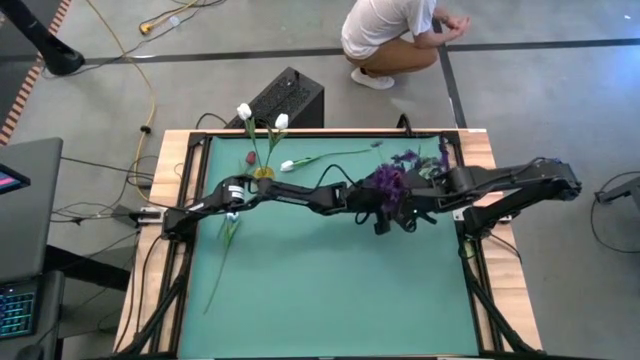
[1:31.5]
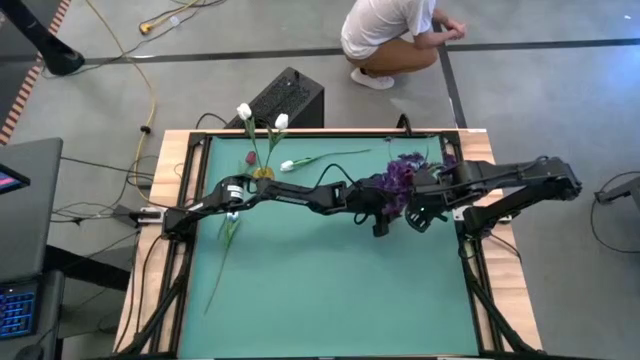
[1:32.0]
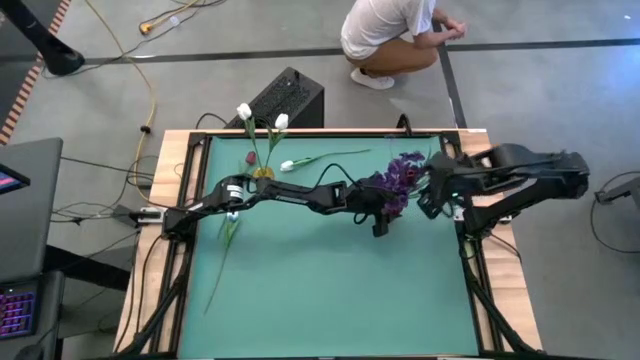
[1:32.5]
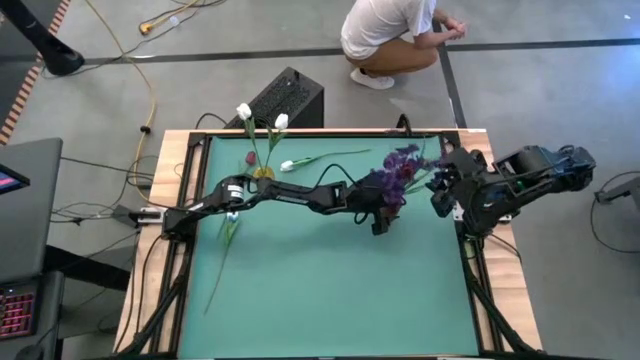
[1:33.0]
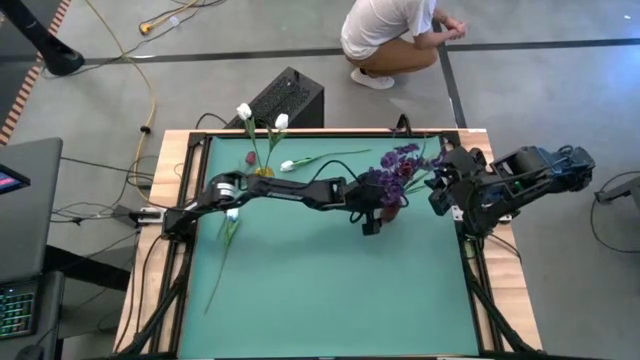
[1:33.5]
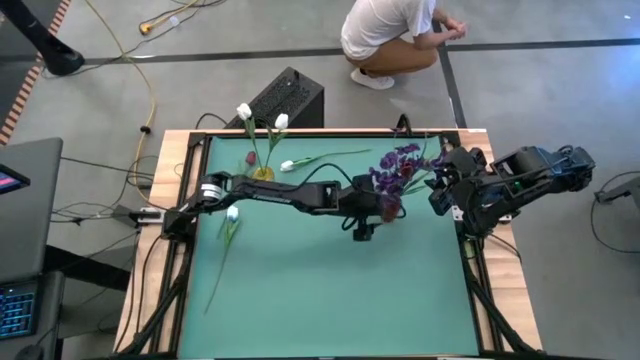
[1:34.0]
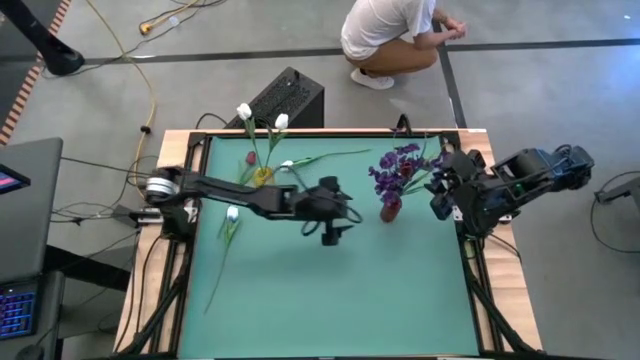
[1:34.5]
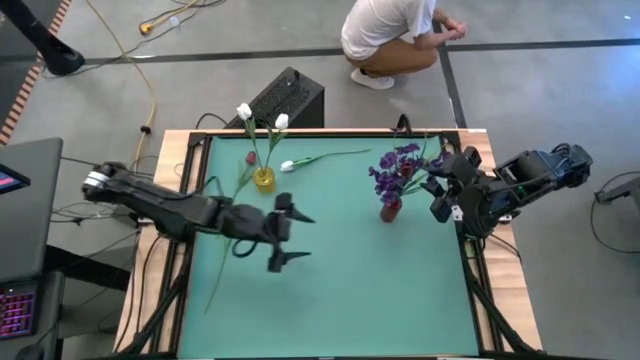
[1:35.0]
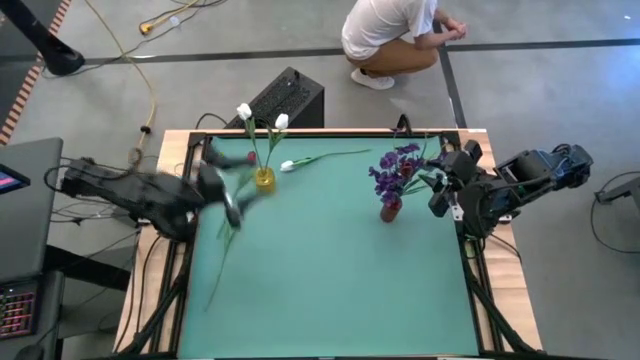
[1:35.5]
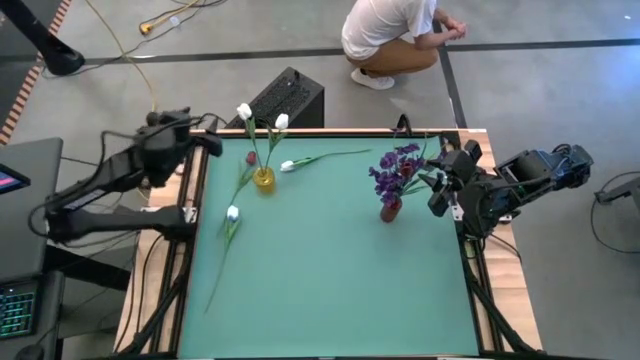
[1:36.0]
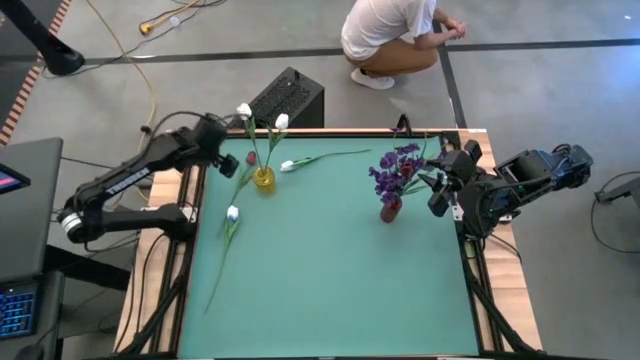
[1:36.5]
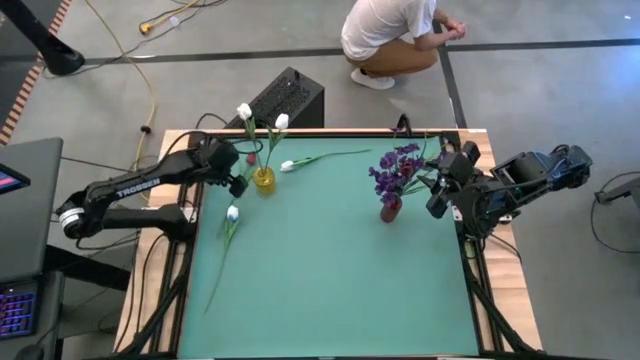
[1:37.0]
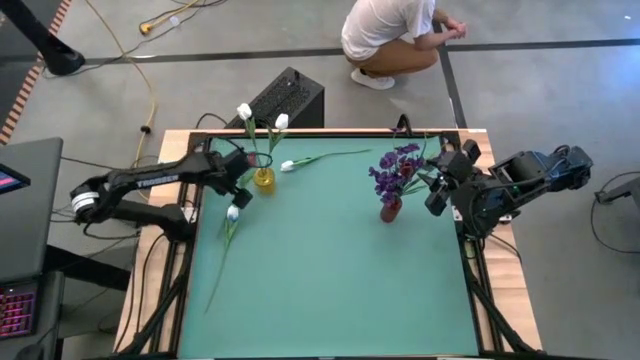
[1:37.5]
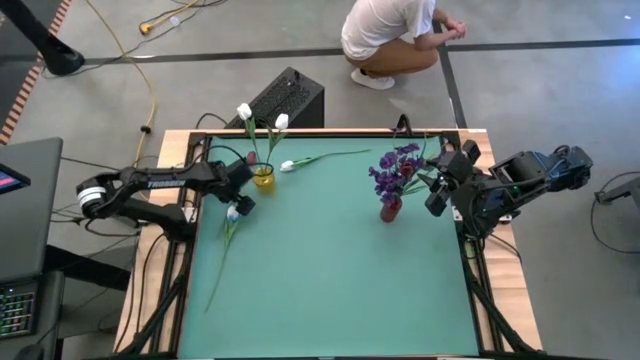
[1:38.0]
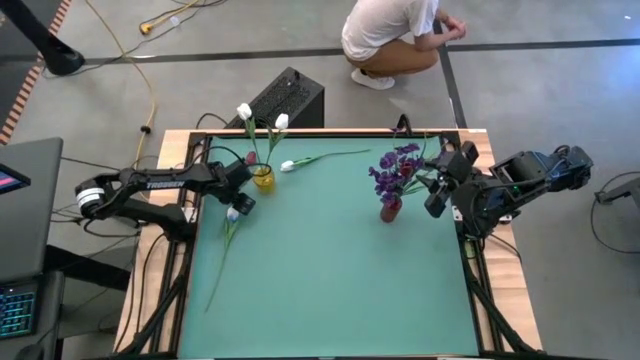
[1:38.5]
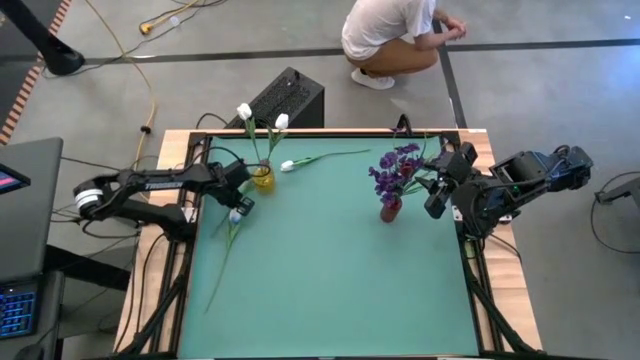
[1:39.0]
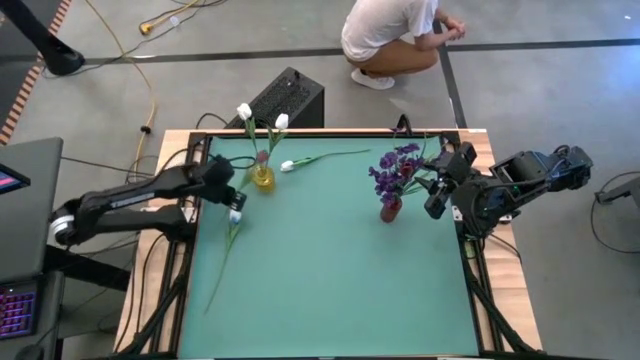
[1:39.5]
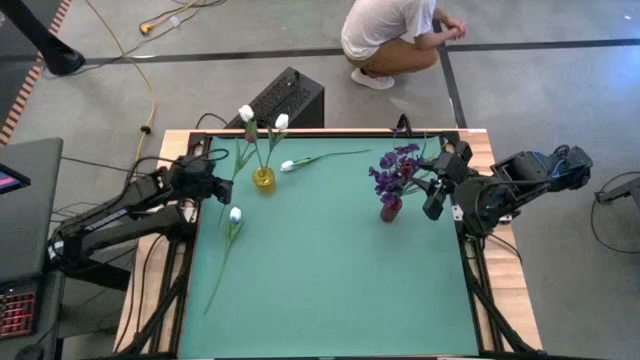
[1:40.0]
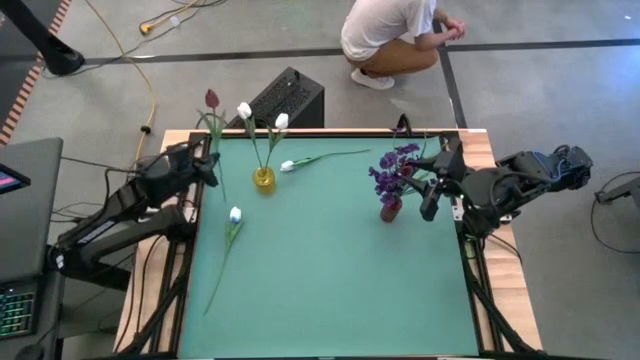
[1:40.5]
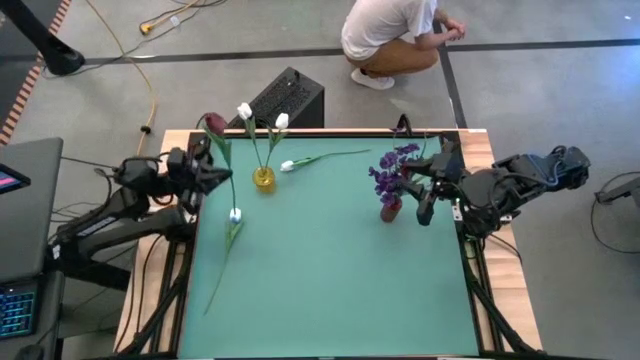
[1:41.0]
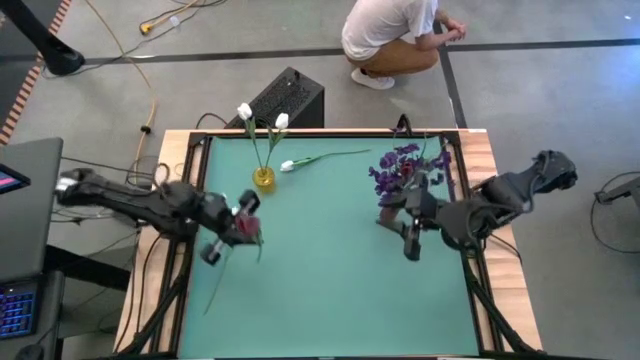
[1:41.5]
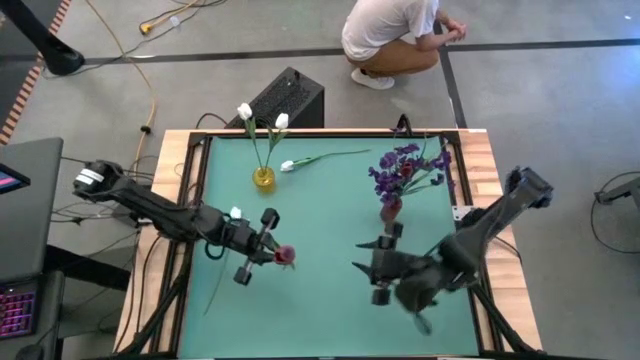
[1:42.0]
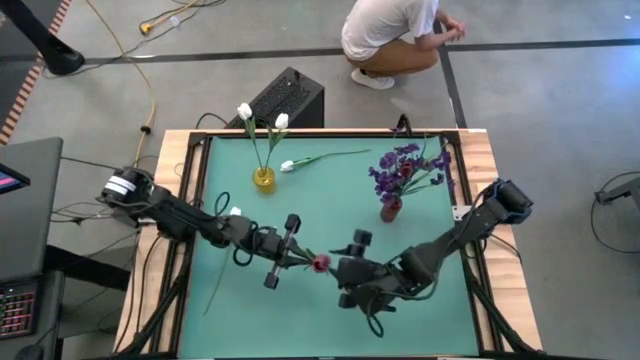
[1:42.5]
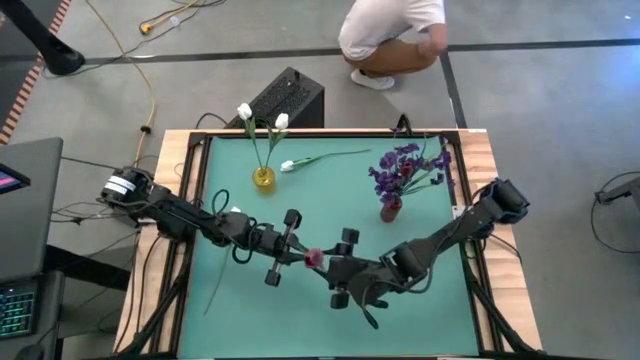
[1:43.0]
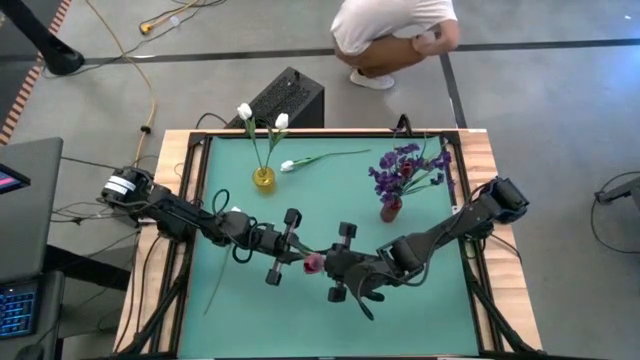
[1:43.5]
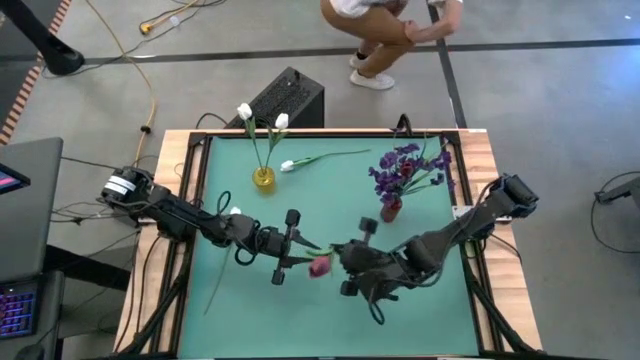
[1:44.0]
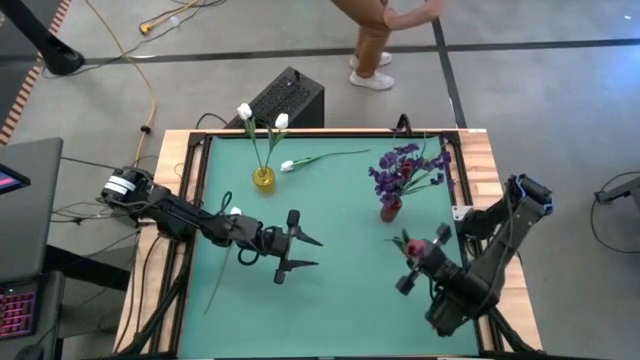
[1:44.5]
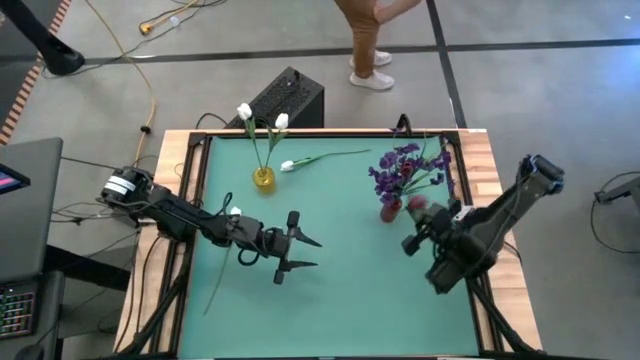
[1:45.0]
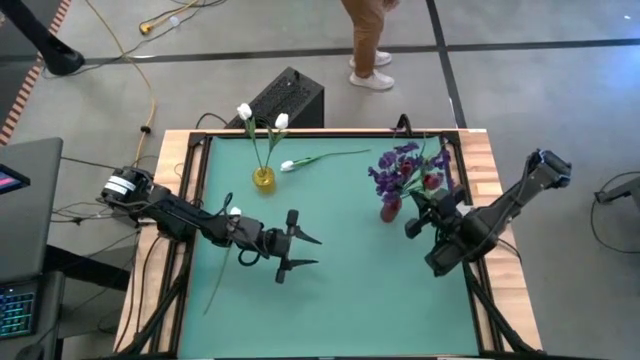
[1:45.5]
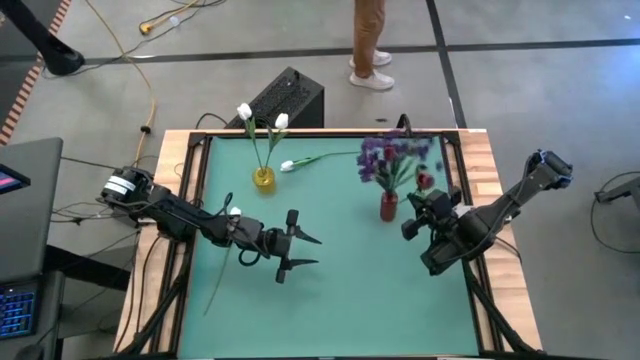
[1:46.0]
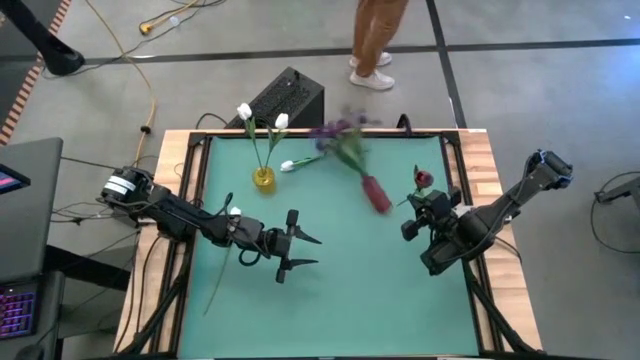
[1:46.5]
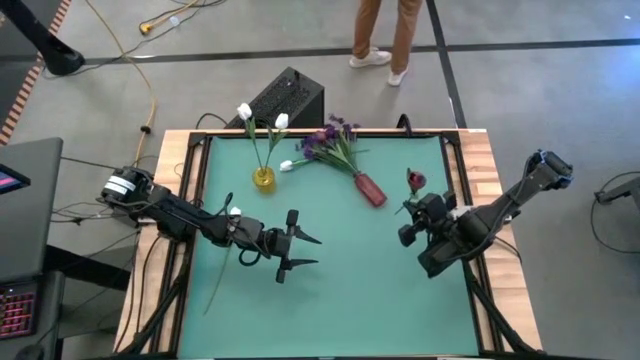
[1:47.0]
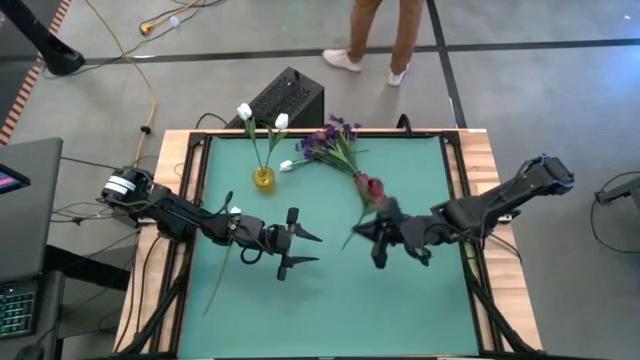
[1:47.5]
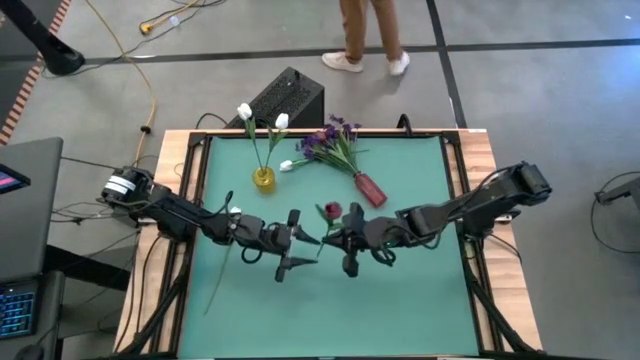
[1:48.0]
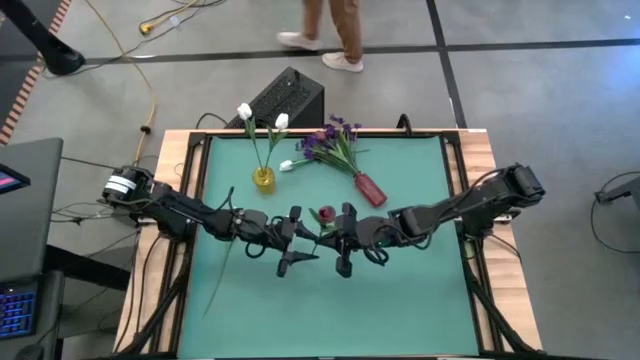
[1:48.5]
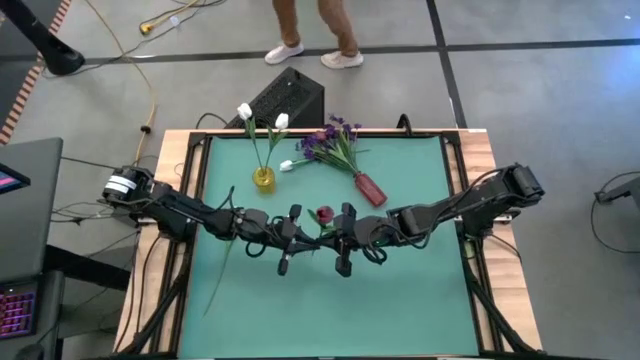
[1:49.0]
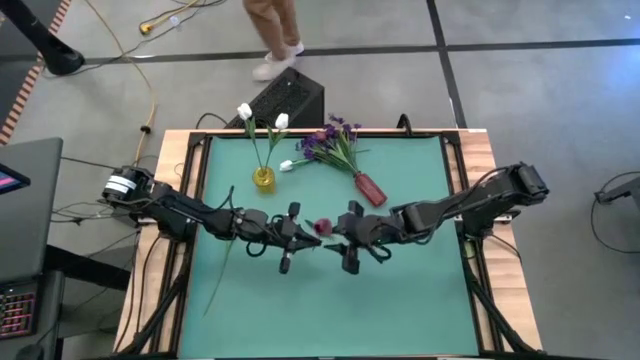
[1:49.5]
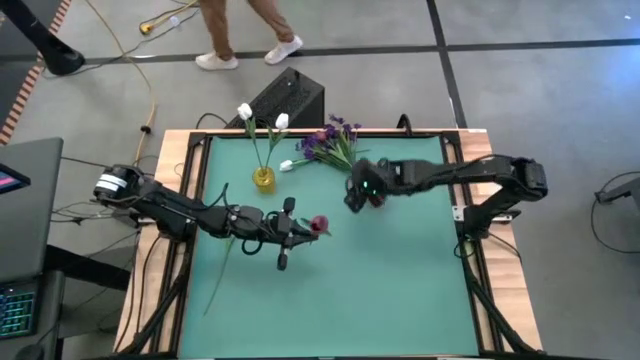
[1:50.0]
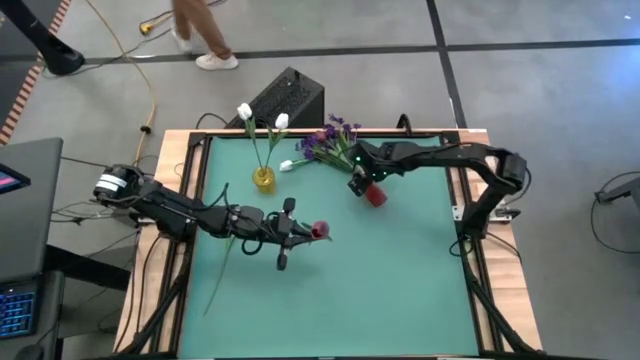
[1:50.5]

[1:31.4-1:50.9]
Task: Sort flowers into vase by color
Put the red flower into the red vase

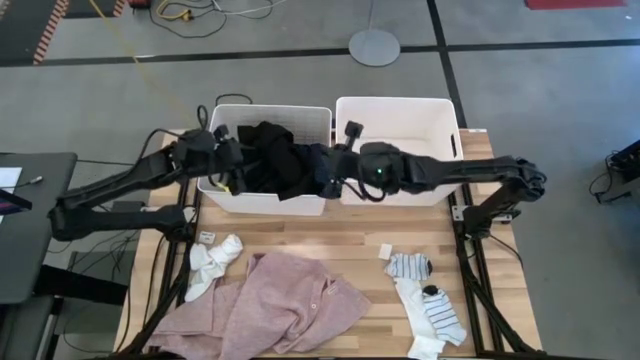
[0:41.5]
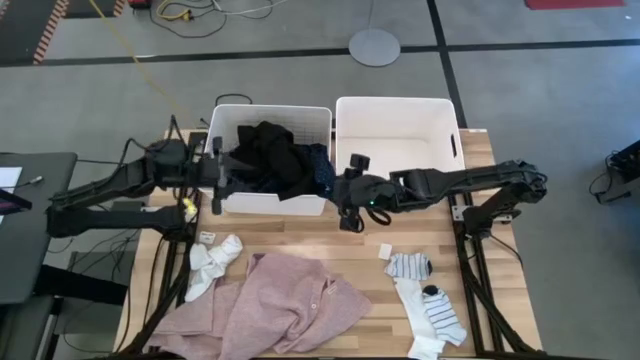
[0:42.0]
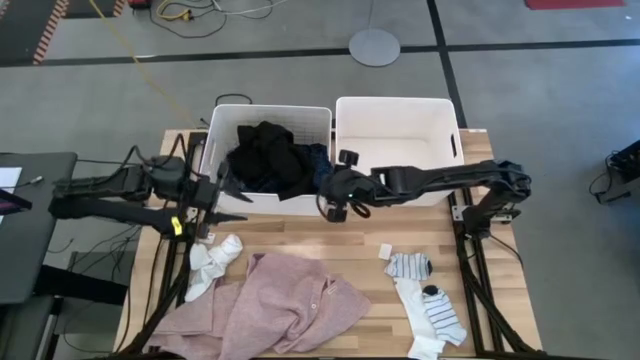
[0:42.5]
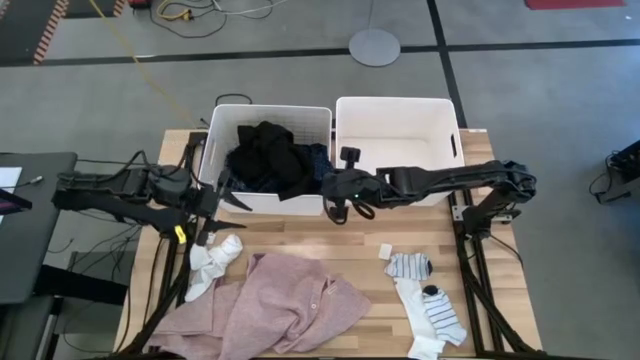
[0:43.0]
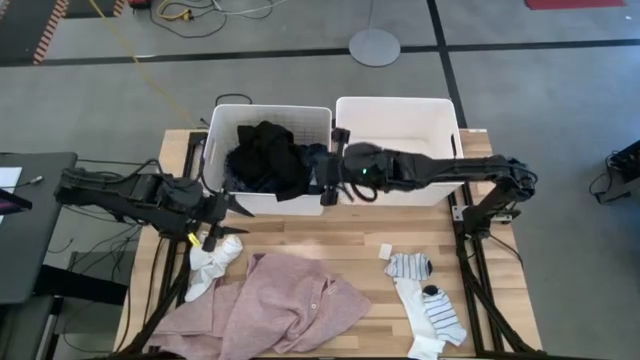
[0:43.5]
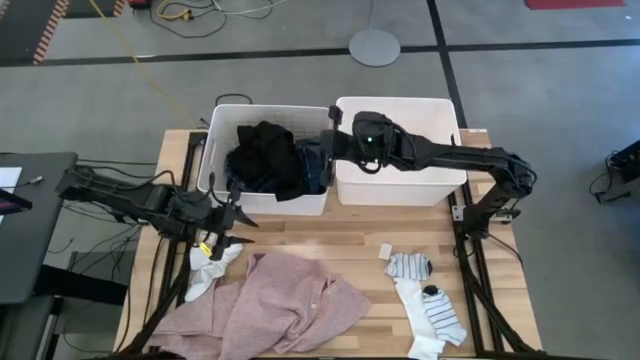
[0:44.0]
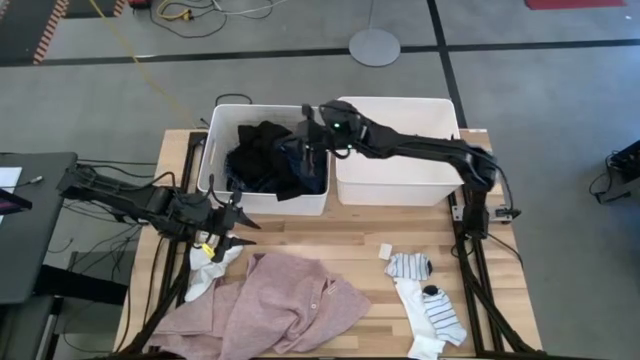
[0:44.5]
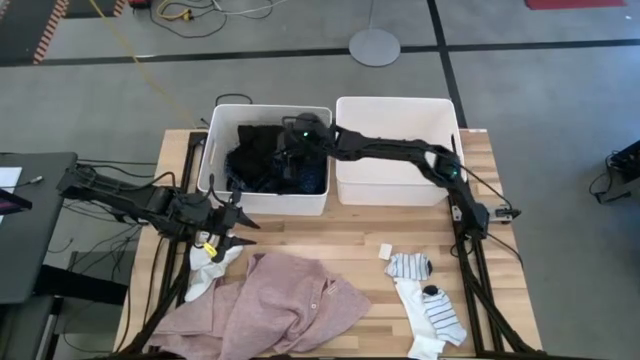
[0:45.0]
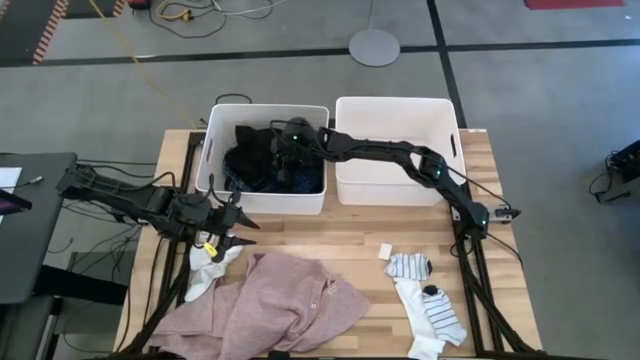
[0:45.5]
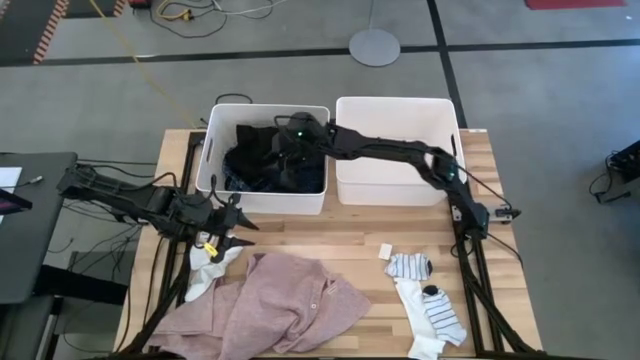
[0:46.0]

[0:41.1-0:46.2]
Task: Sort clothes
Adjust the light blue polo shirt into the white laundry bin
